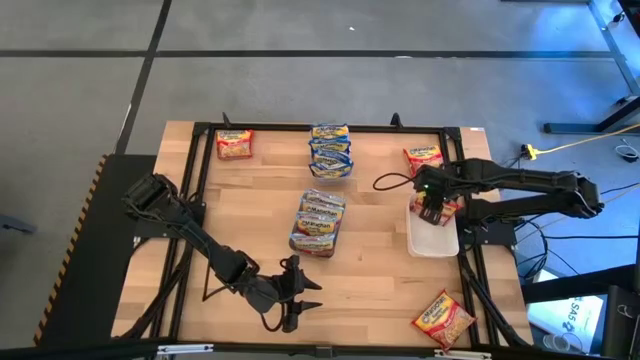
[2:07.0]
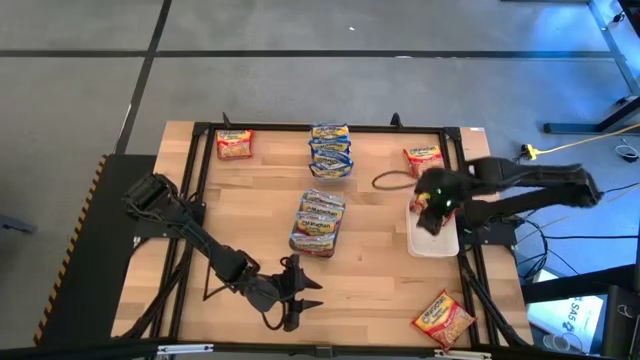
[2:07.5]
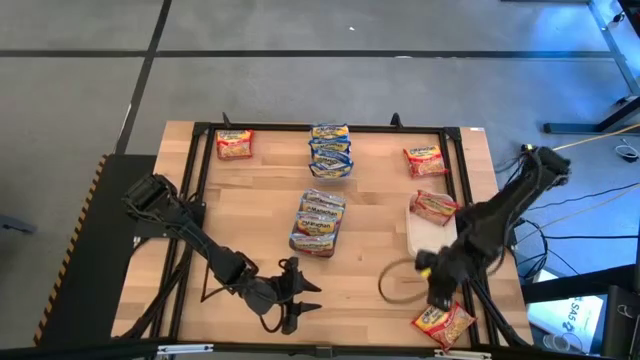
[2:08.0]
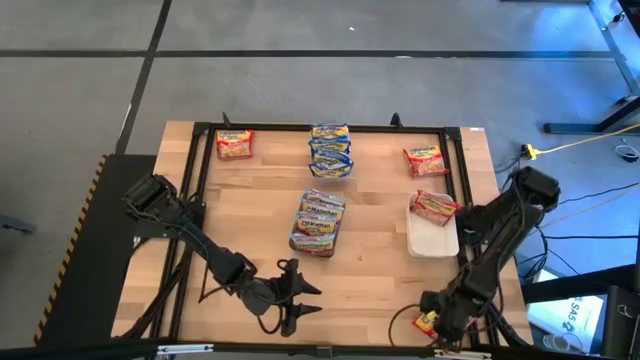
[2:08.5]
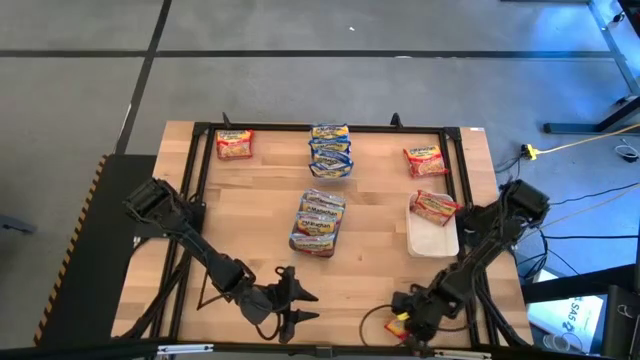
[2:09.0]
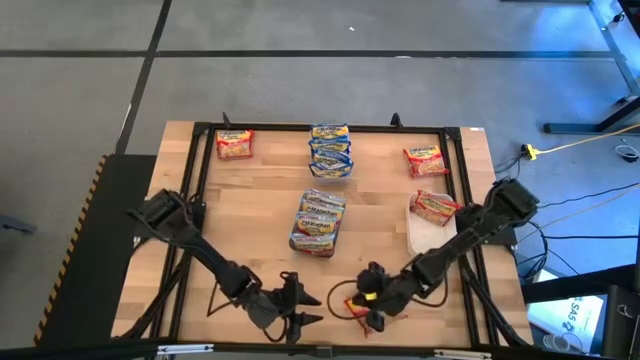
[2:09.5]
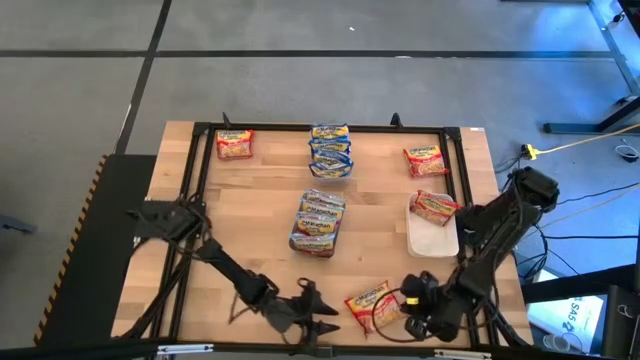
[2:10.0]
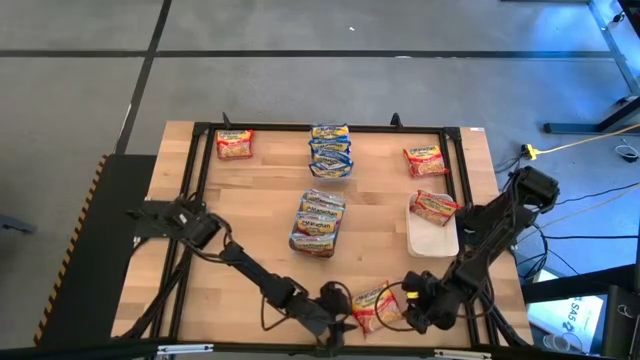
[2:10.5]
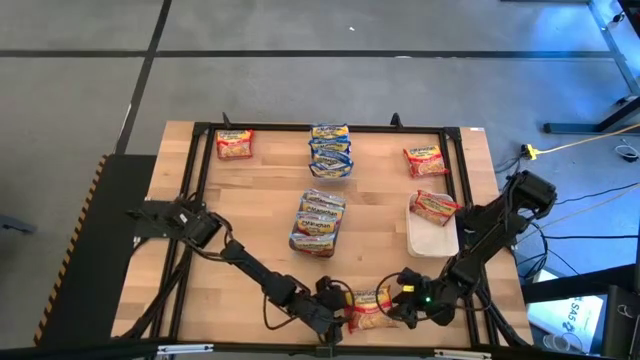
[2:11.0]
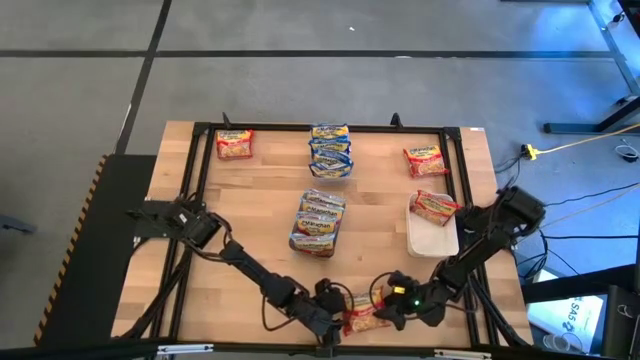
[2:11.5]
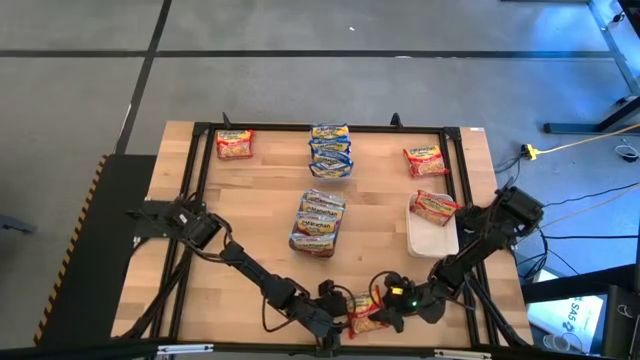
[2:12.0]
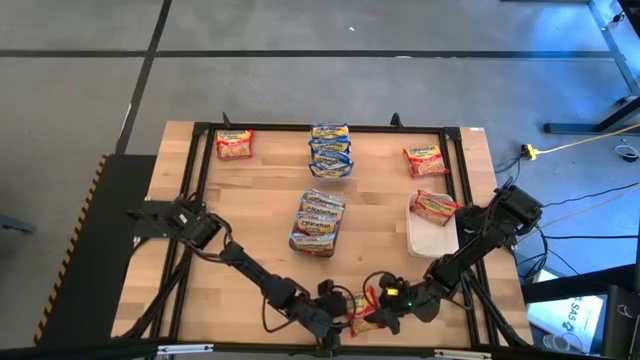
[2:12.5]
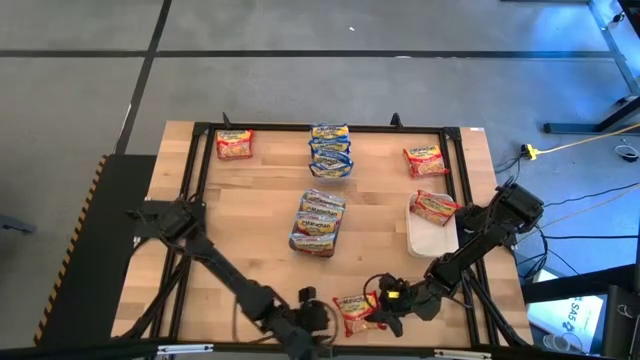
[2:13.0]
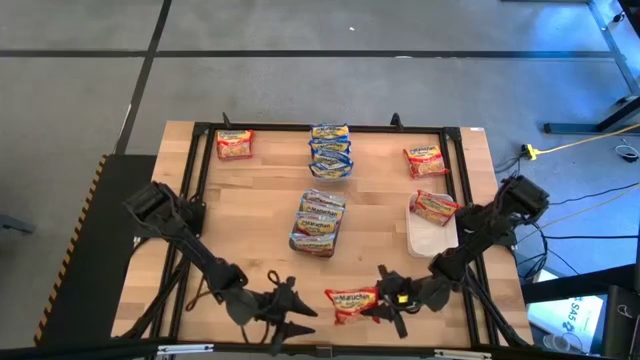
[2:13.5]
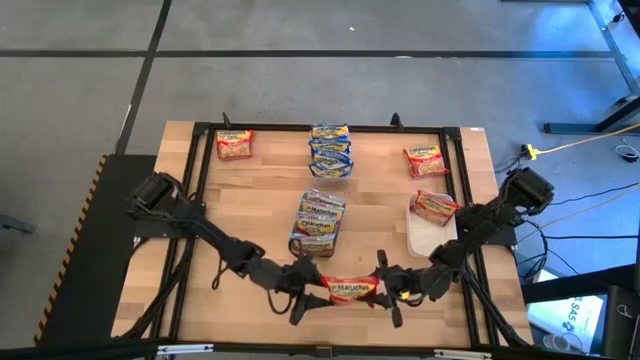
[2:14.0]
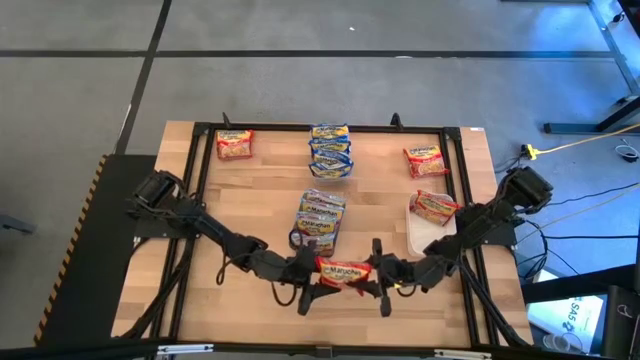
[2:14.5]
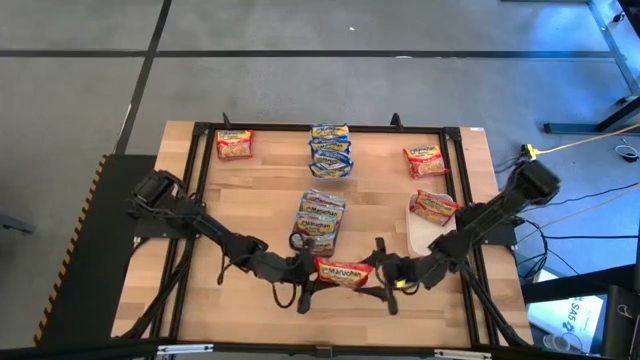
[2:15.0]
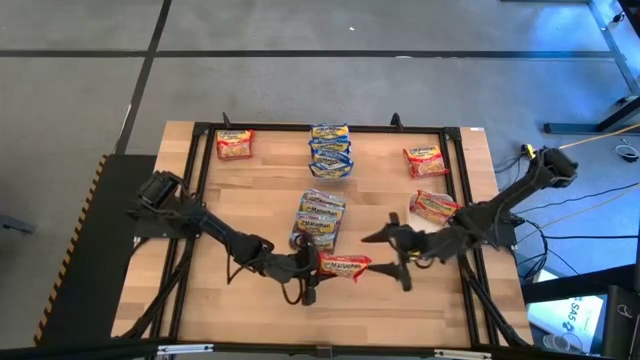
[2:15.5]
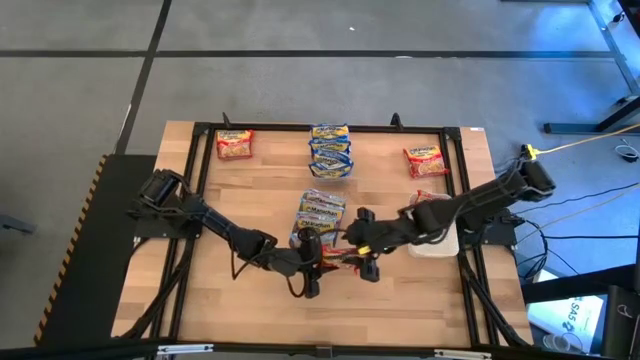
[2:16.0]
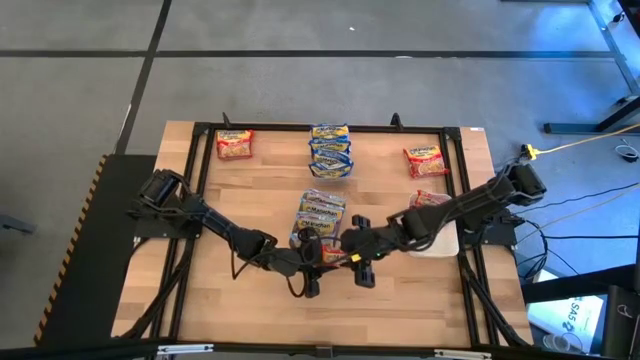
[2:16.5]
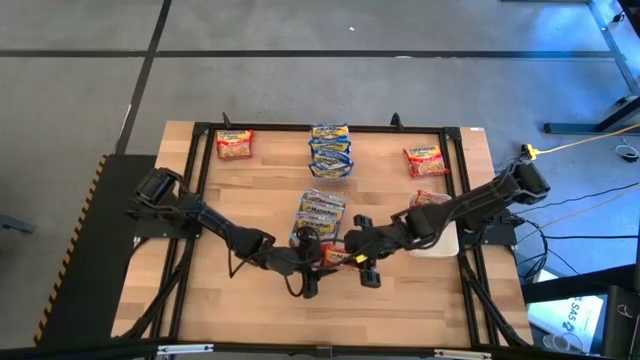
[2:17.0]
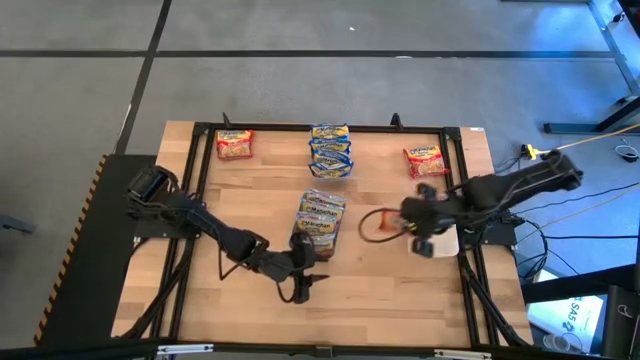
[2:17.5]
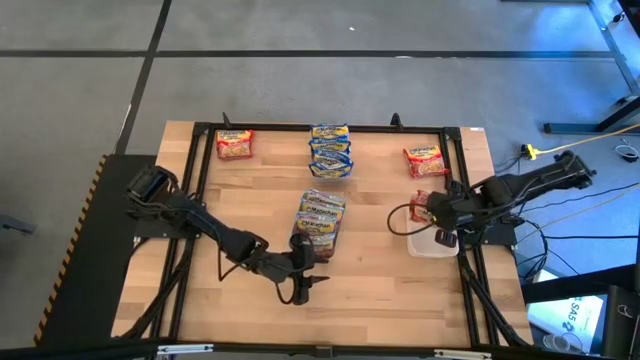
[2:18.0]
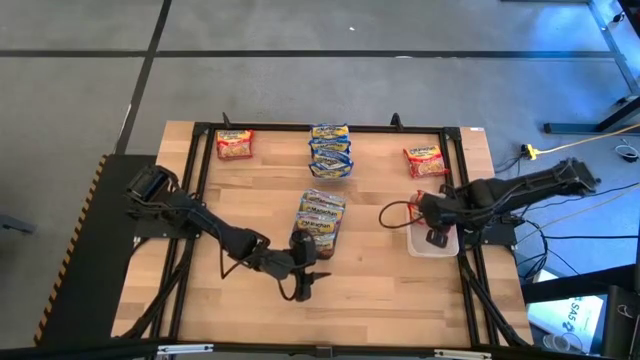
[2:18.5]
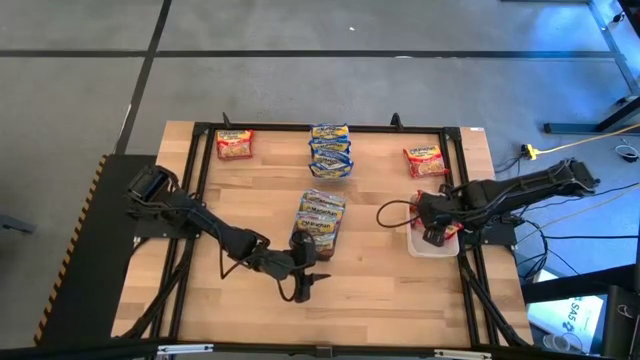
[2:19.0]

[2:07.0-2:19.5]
Task: Sort Maruchan noodles
Put the red noodle pack into the white bin

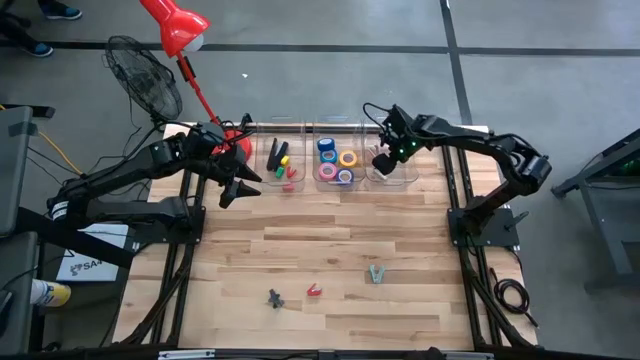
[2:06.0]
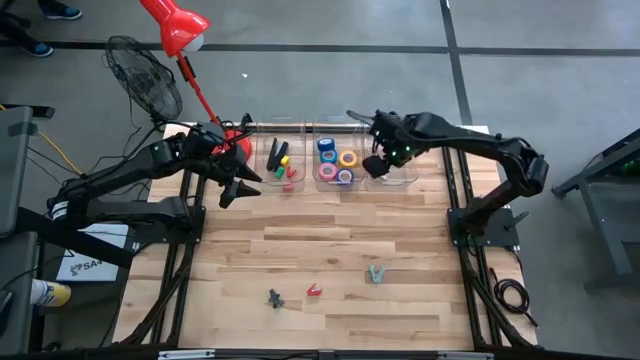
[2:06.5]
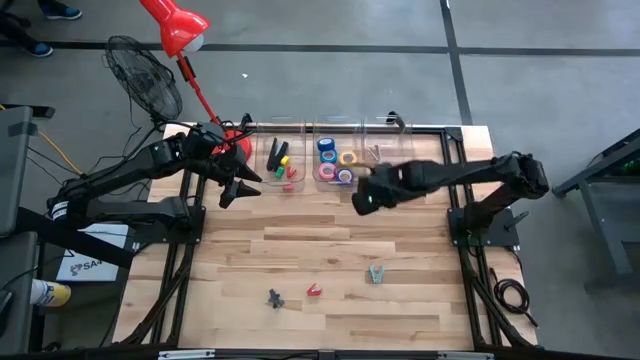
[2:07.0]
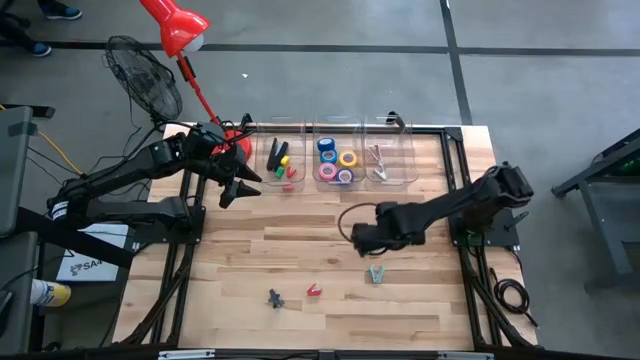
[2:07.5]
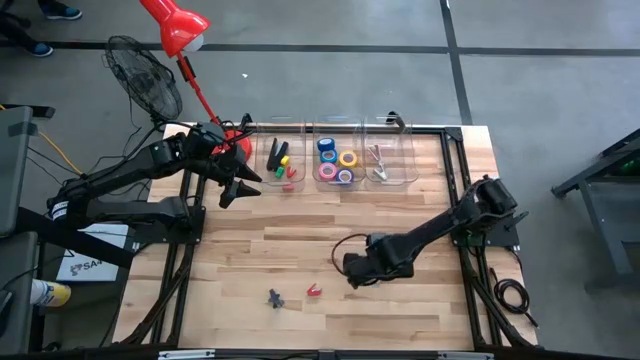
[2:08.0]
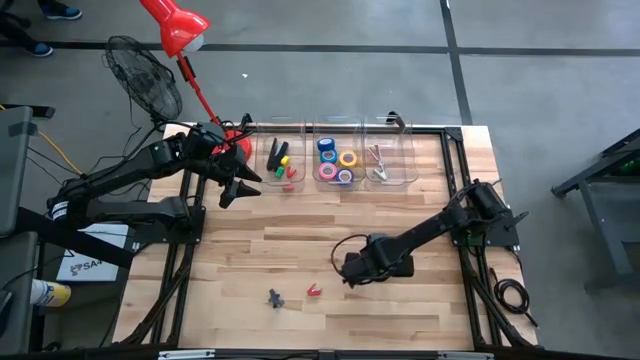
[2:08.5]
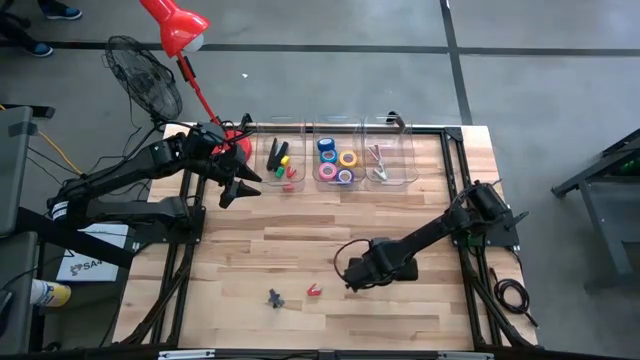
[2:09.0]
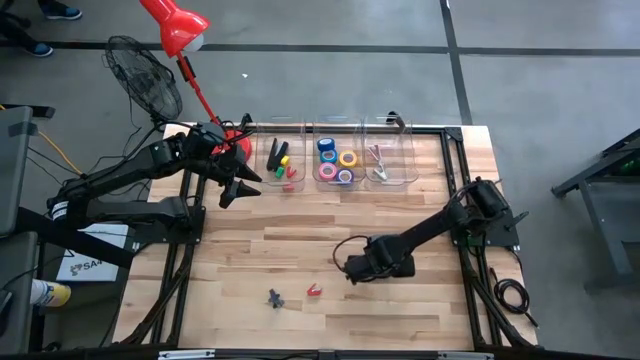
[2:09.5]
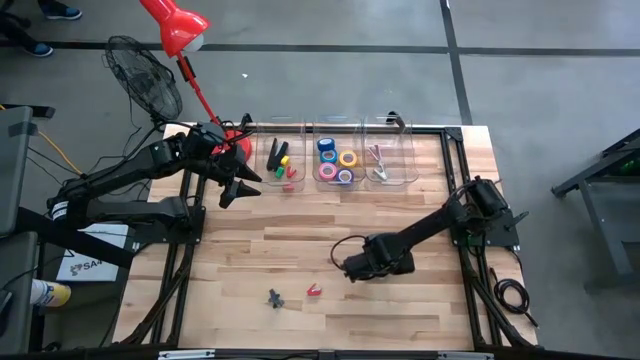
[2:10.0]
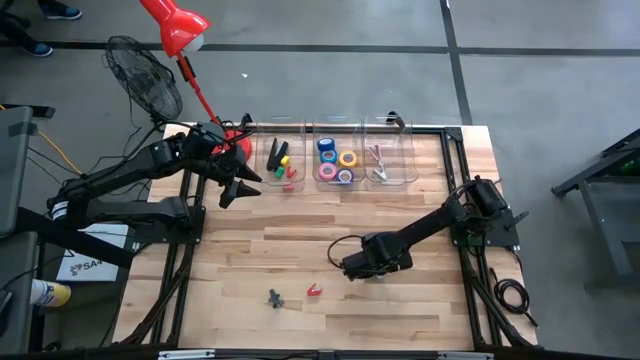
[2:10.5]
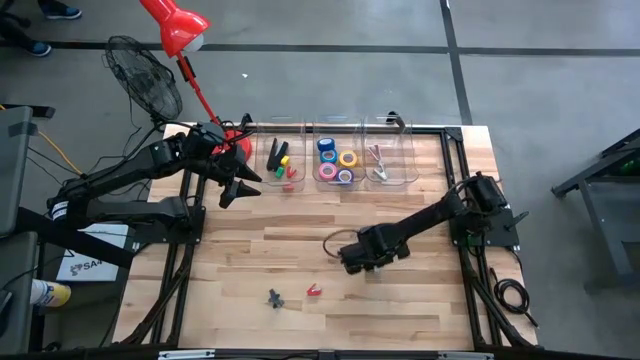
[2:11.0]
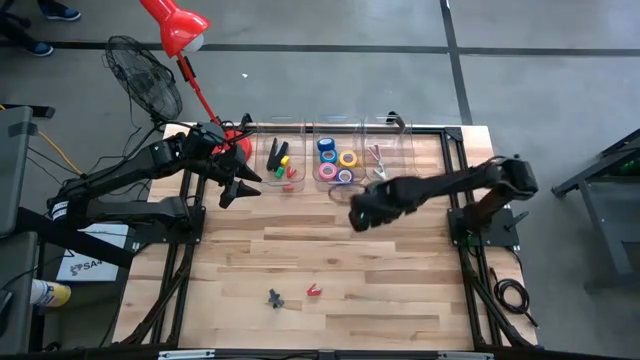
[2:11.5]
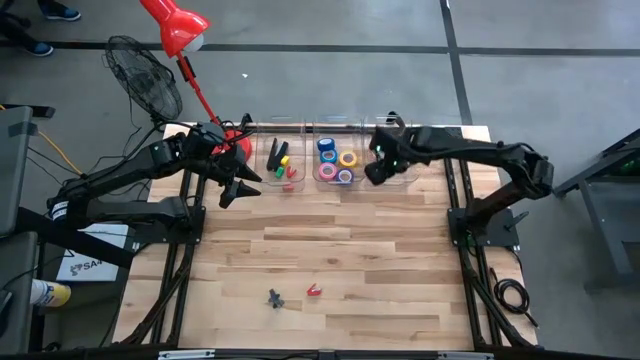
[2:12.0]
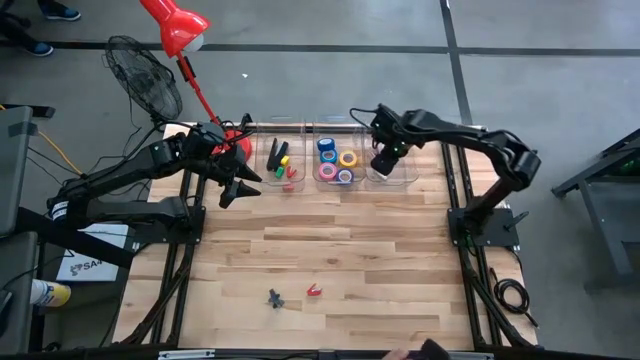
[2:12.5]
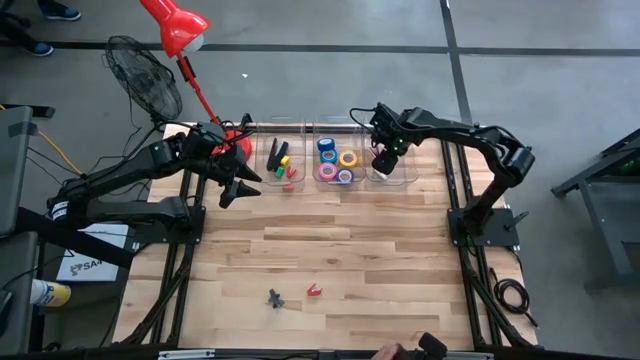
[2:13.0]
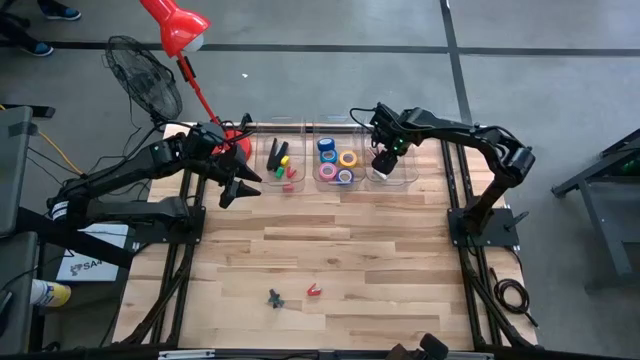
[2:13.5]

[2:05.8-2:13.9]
Task: Pick and place Stapler, Stapler remover, tape
Put the blue staple remover into the right transparent bin

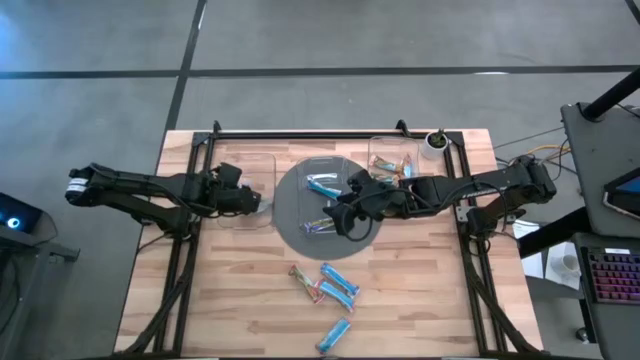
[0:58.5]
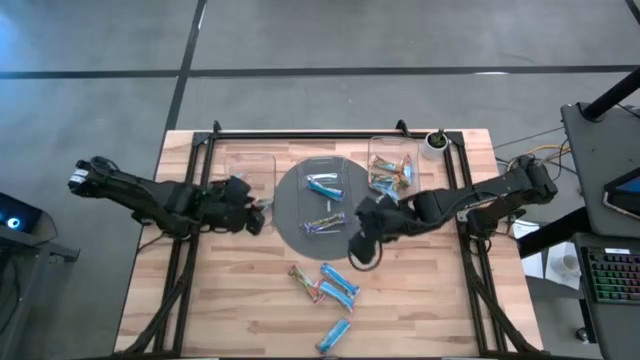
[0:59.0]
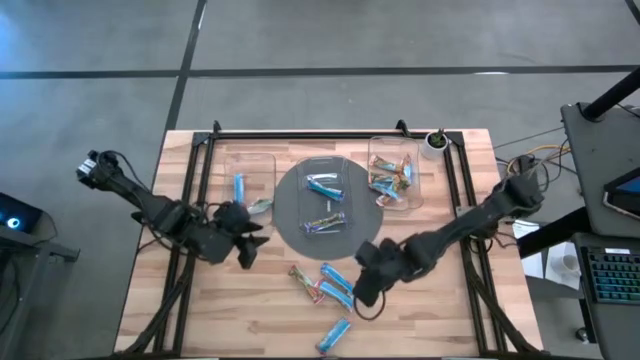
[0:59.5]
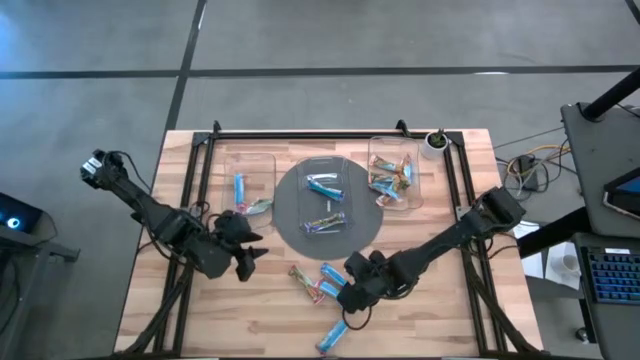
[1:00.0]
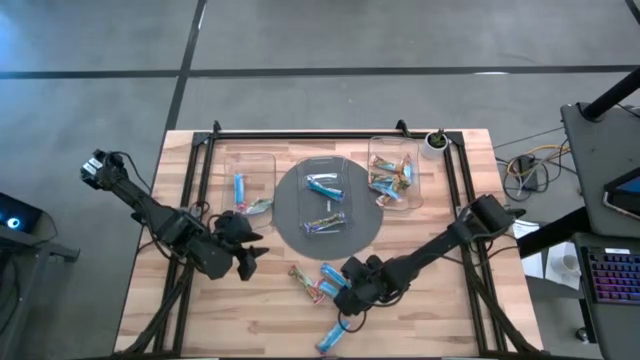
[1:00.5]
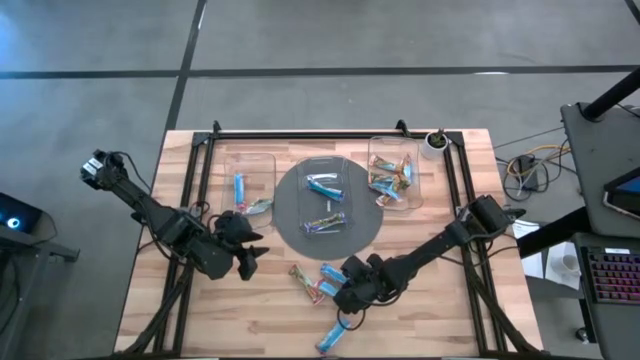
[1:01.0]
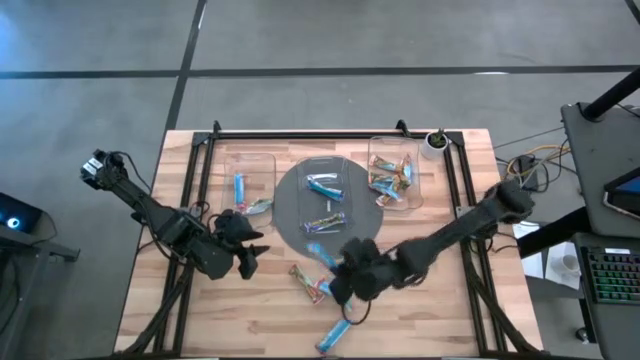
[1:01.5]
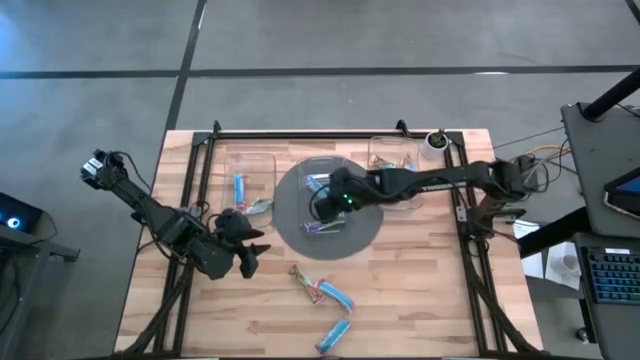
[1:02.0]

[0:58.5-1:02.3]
Task: Pick and place Granola Bars by type
Put the blue granola bar into the middle transparent bin
